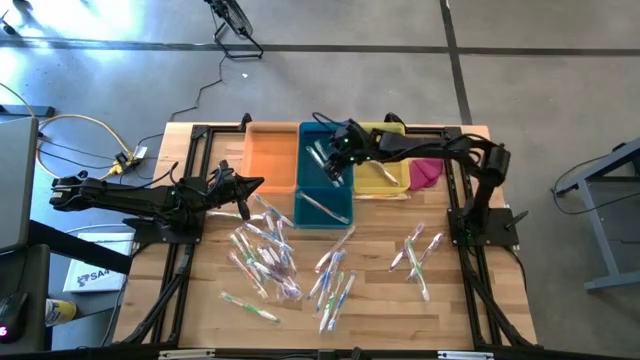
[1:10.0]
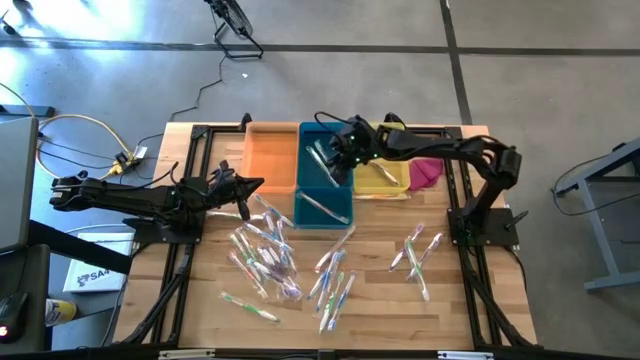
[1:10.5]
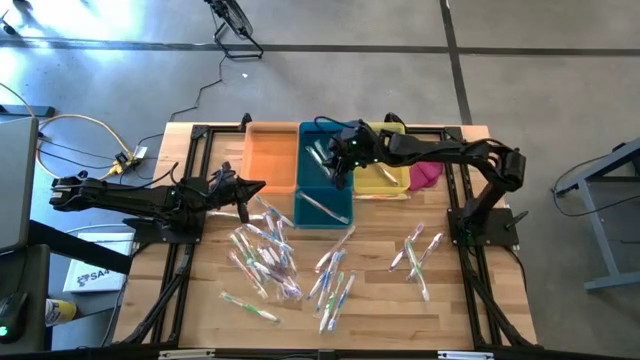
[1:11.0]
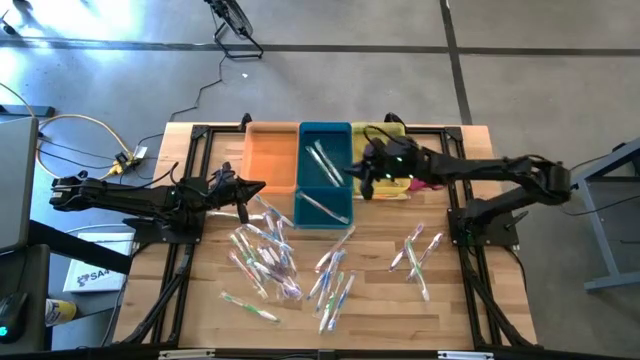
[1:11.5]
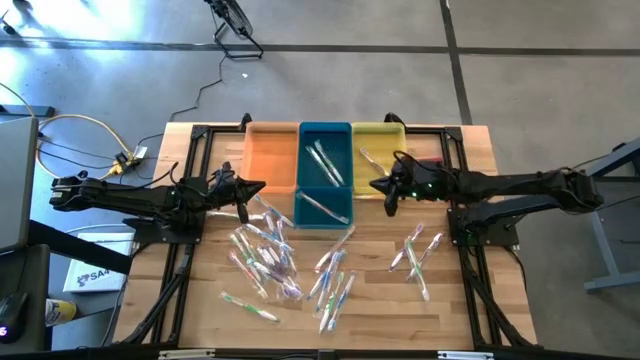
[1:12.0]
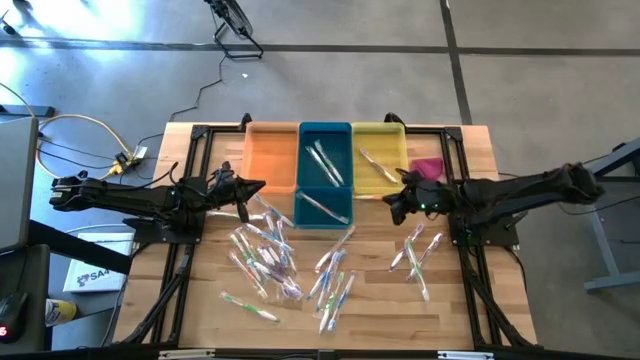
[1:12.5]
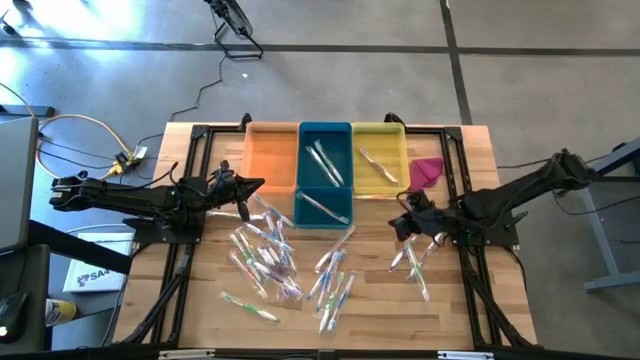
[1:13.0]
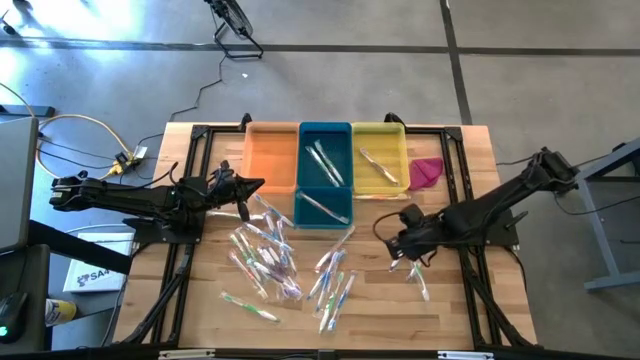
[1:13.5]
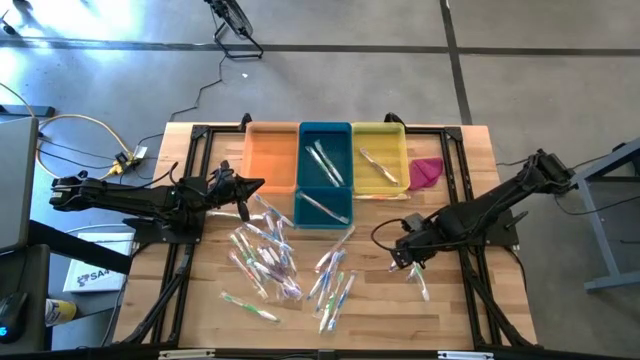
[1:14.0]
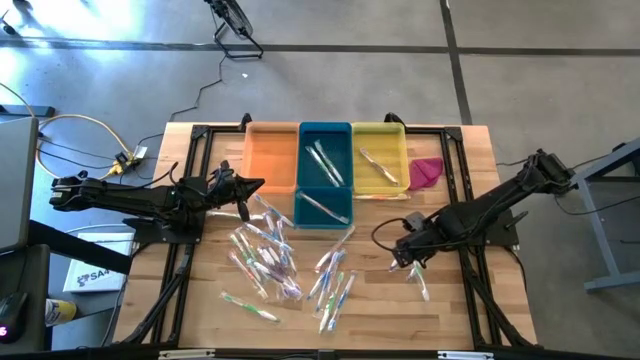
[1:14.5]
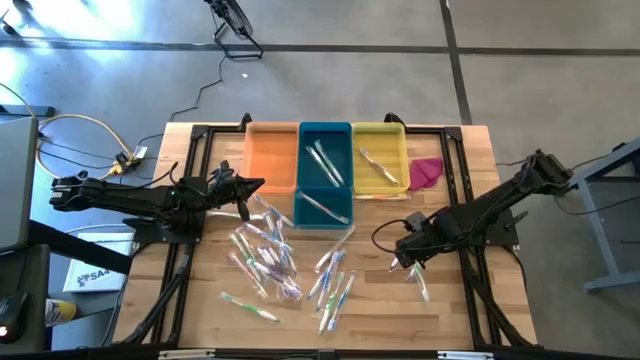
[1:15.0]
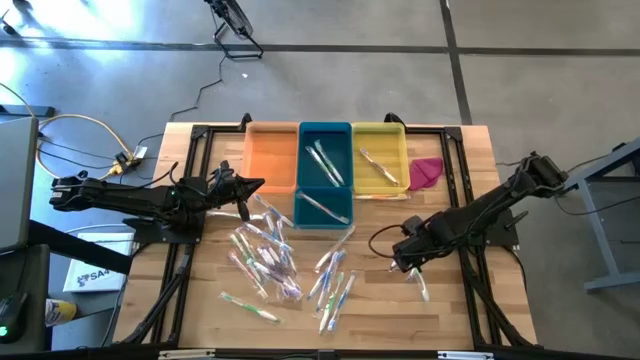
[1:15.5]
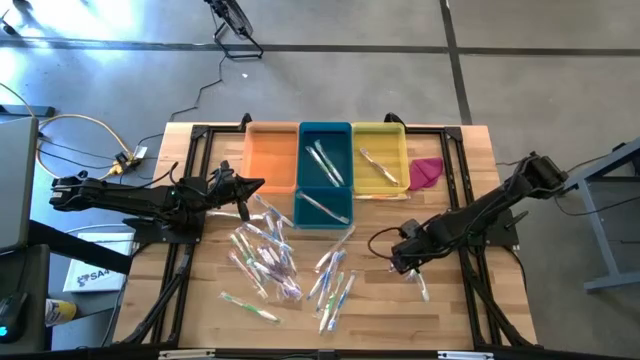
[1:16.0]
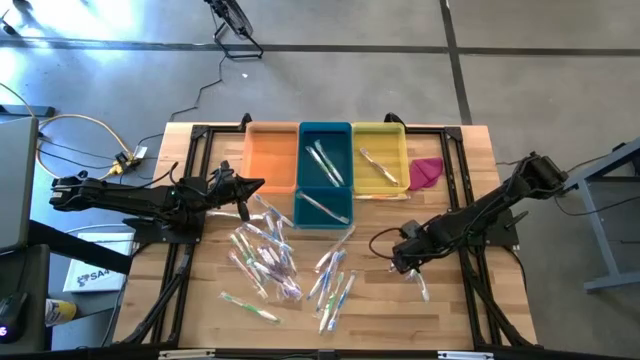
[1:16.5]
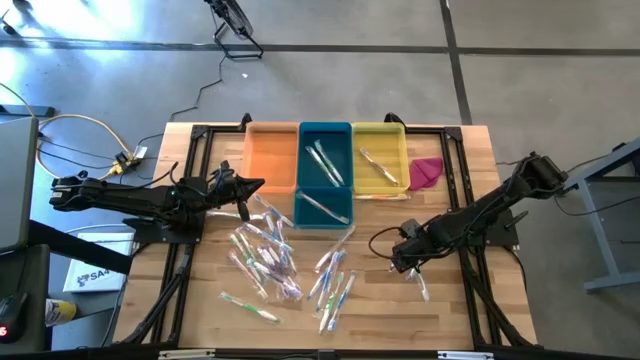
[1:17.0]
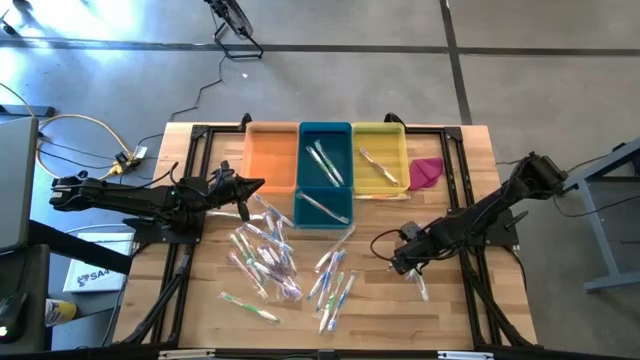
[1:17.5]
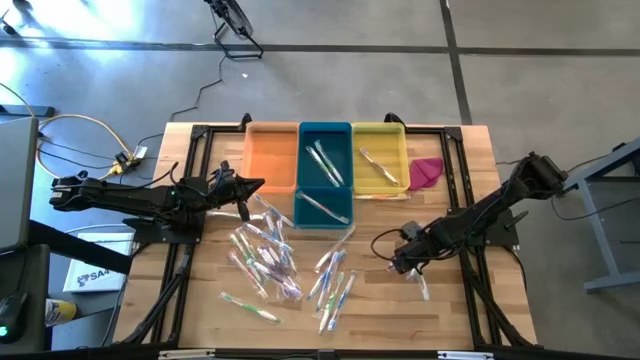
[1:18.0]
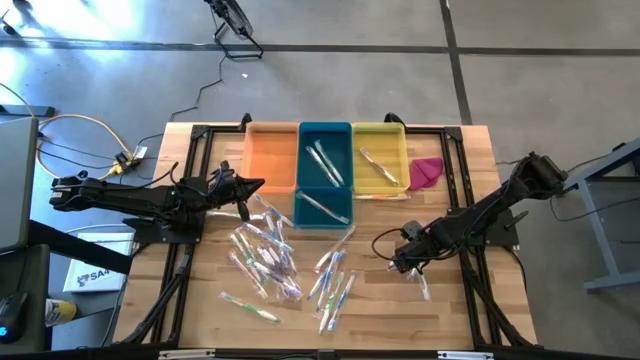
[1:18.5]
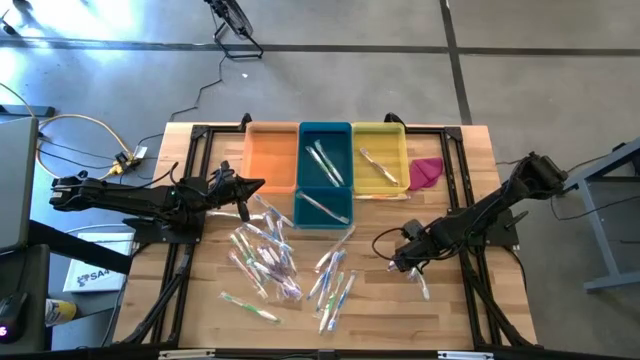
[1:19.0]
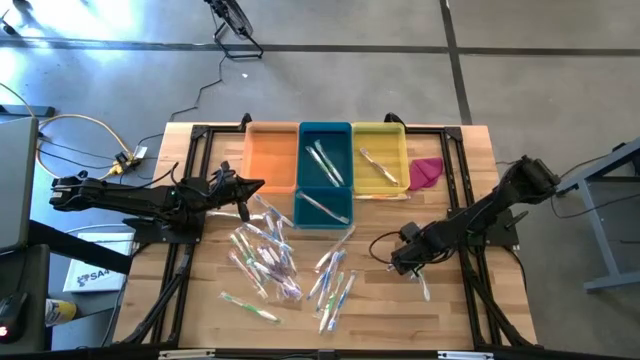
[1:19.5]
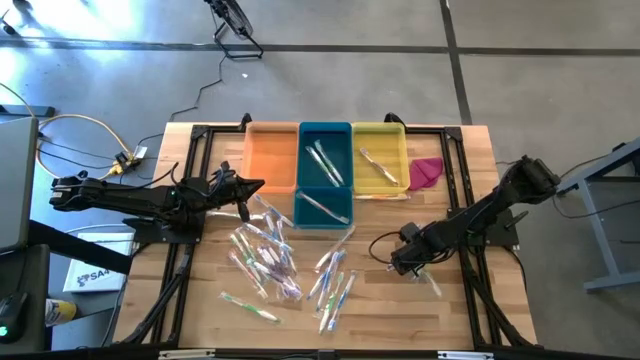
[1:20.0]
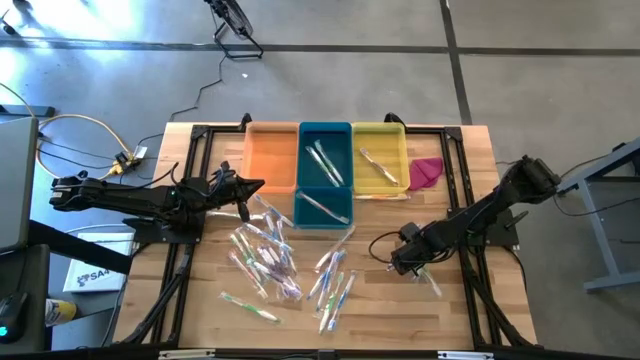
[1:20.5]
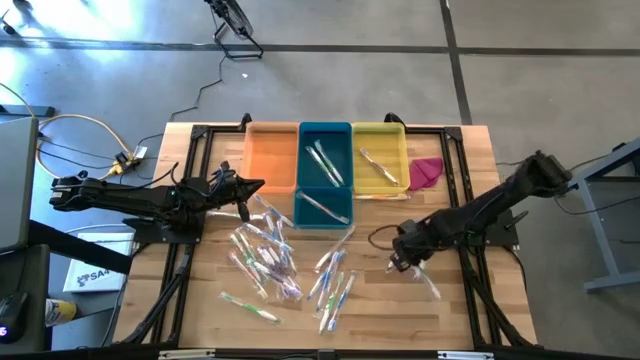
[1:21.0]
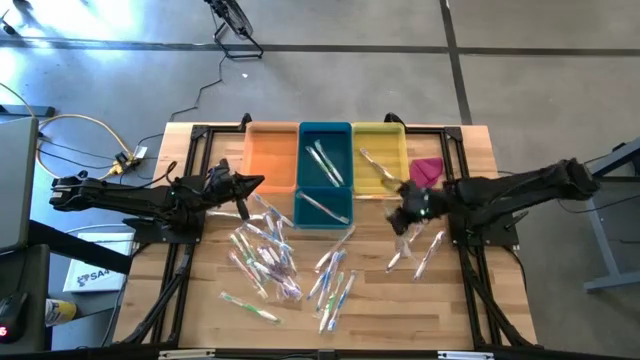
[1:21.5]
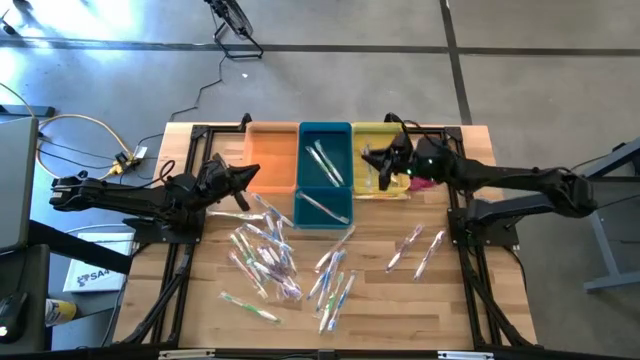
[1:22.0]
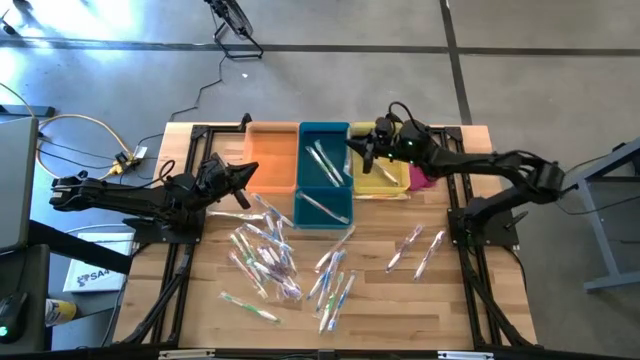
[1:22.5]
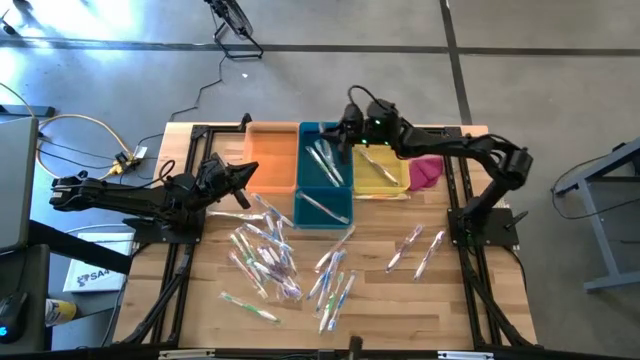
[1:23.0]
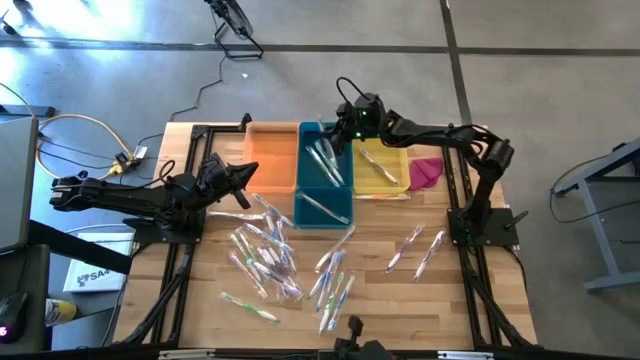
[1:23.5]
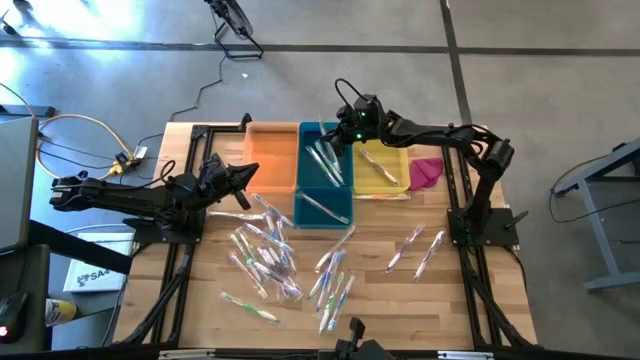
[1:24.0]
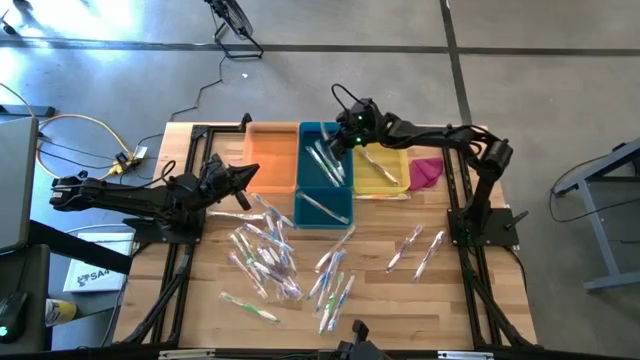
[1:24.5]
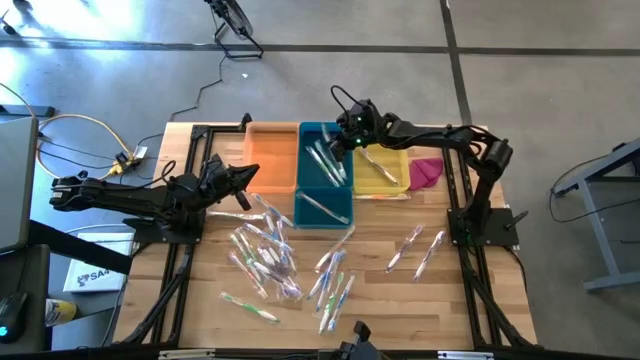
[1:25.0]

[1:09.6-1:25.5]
Task: Pick & Place Toothbrushes
Put the green toothbrush into the top blue bin

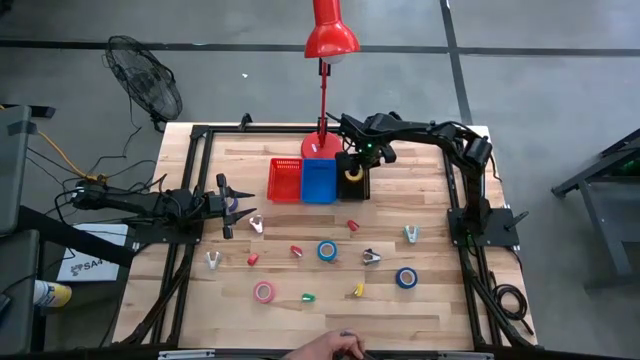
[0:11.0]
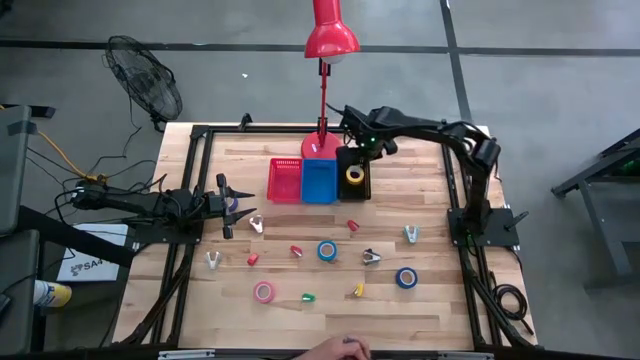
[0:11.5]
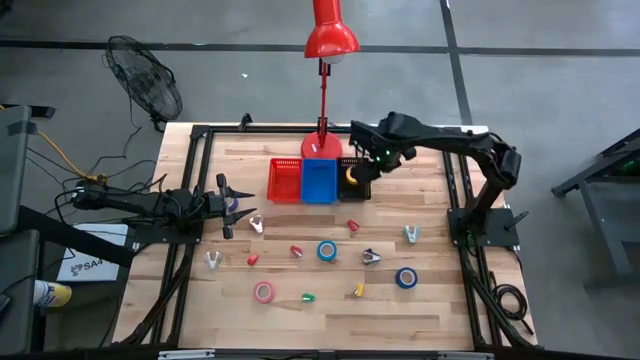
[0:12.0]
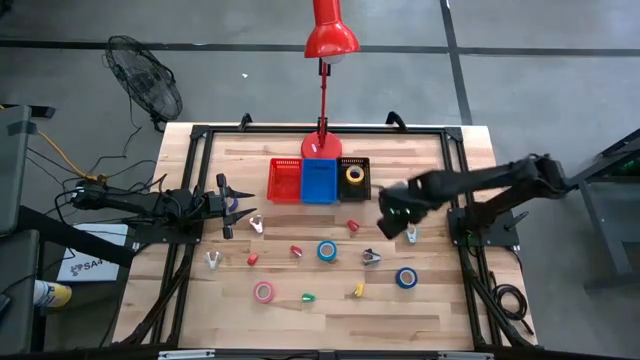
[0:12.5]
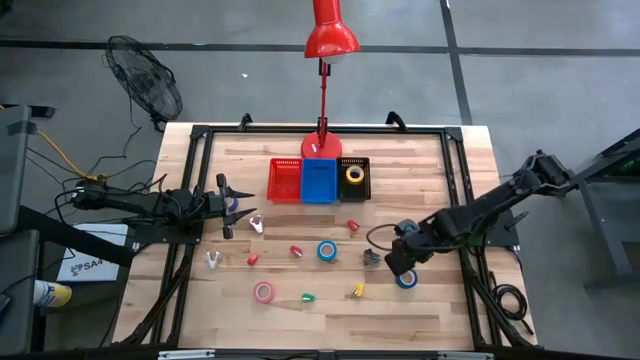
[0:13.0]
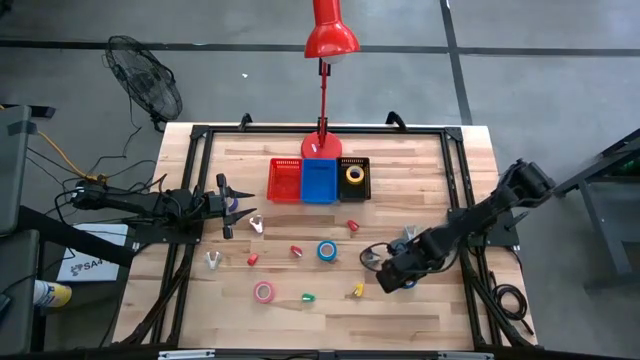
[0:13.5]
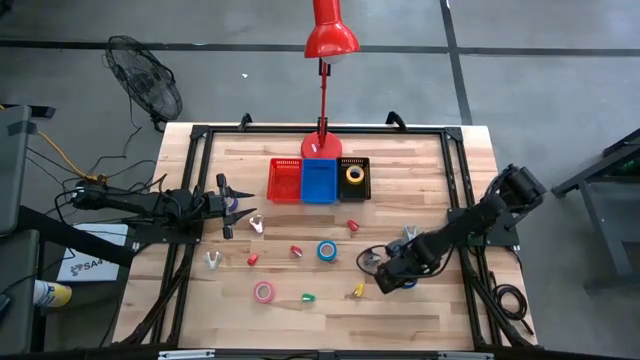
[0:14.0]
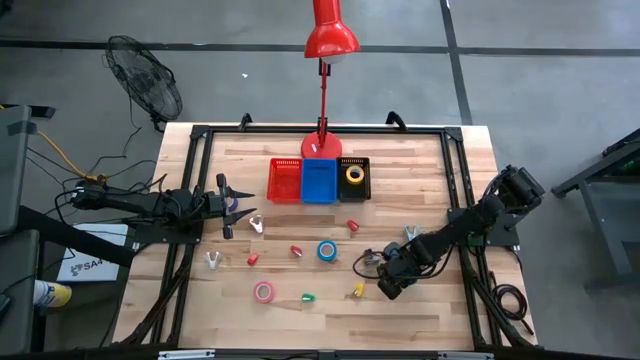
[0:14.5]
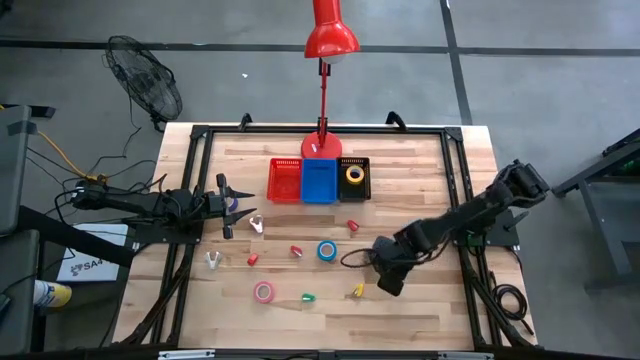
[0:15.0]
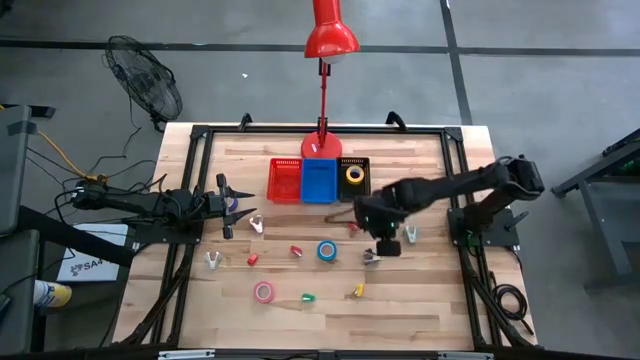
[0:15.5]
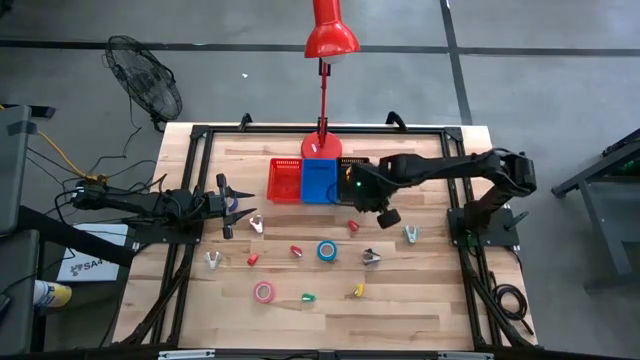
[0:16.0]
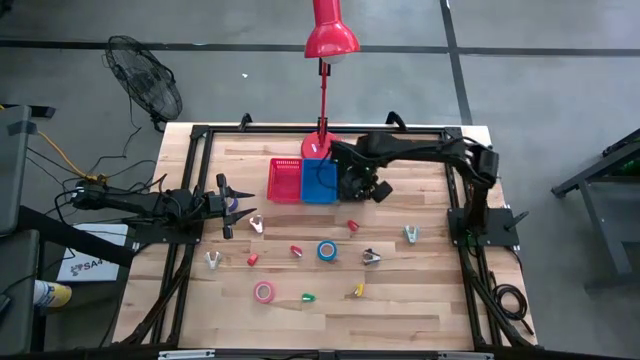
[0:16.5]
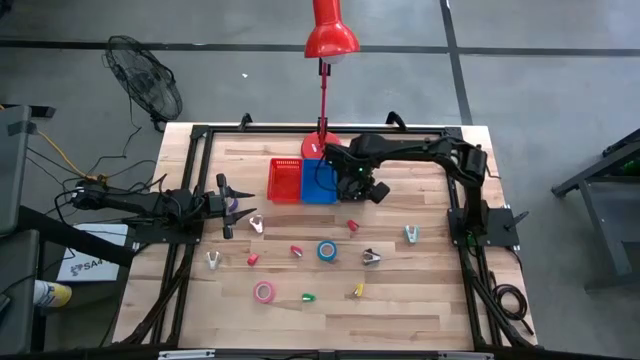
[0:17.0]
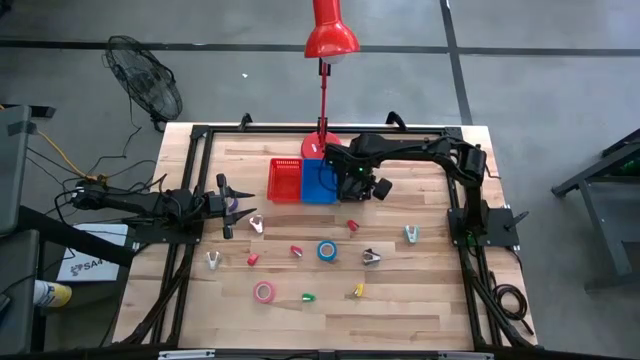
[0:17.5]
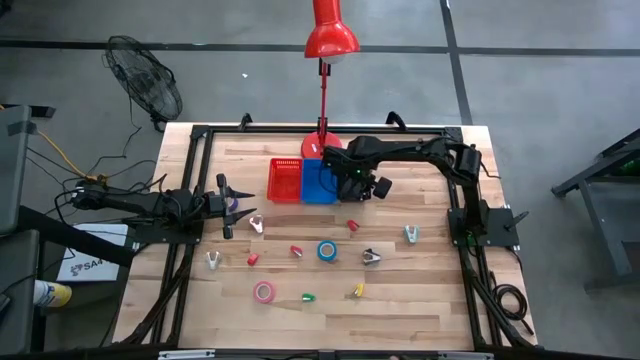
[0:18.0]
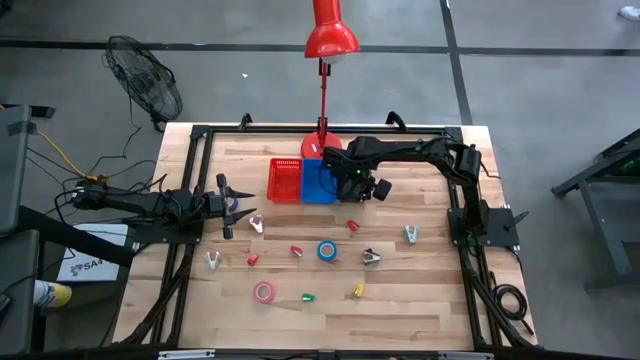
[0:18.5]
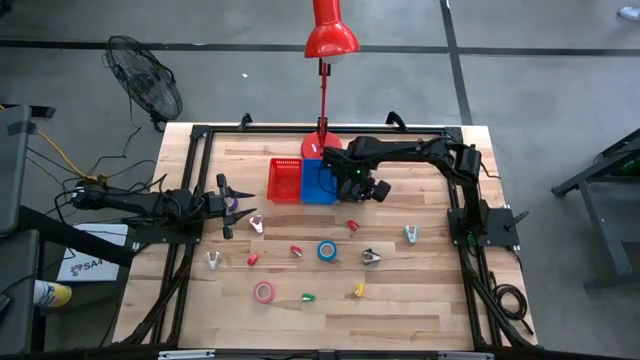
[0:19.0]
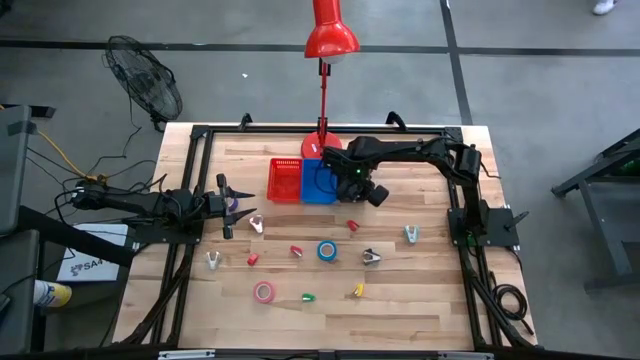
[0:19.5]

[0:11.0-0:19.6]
Task: Pick and place Stapler, Stapler remover, tape
Put the blue tape into the black basket
